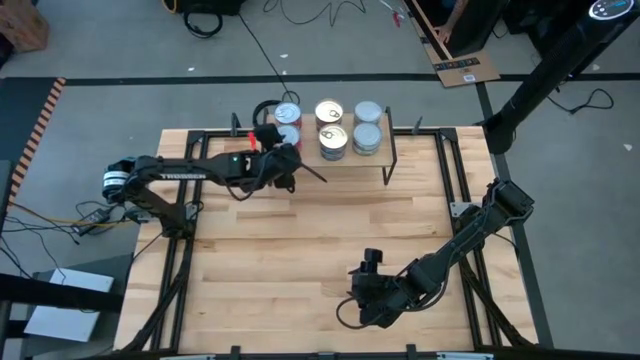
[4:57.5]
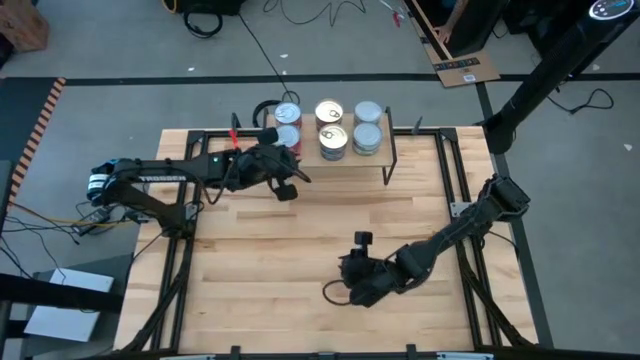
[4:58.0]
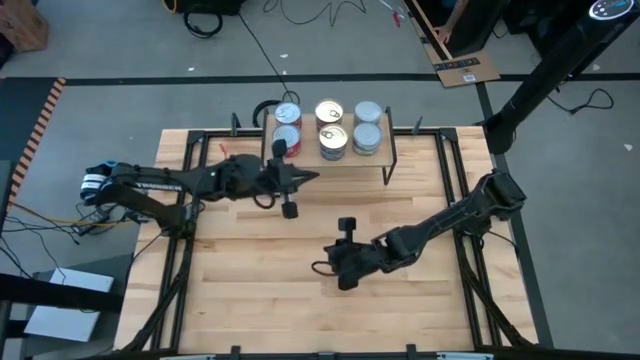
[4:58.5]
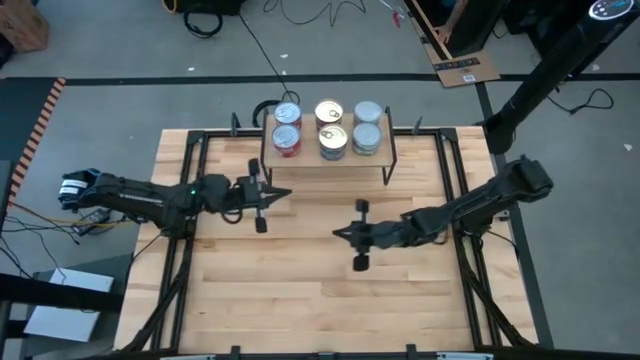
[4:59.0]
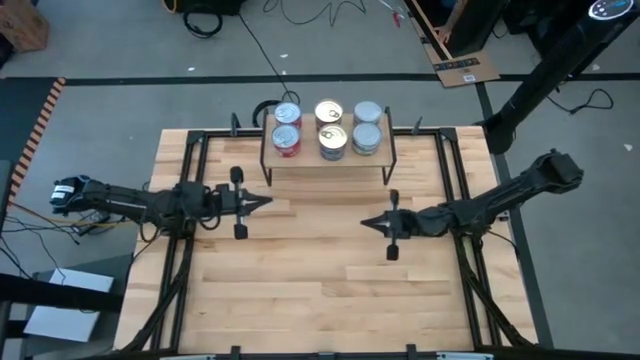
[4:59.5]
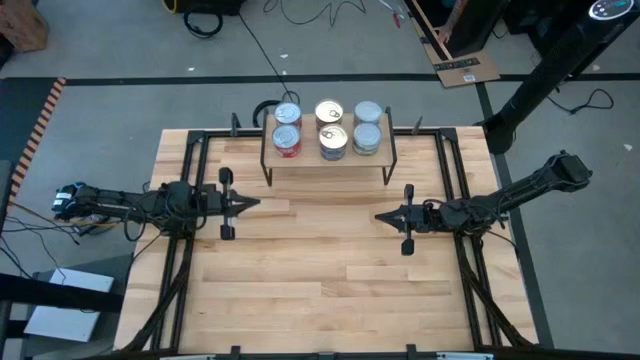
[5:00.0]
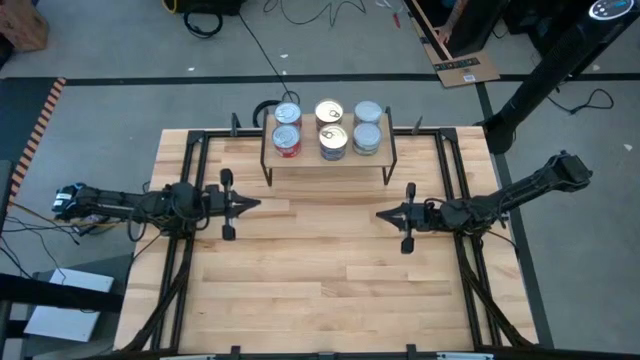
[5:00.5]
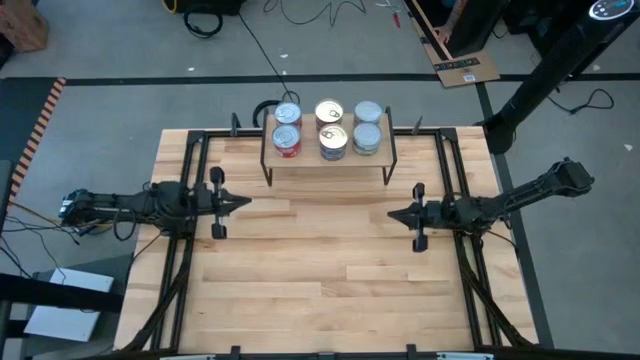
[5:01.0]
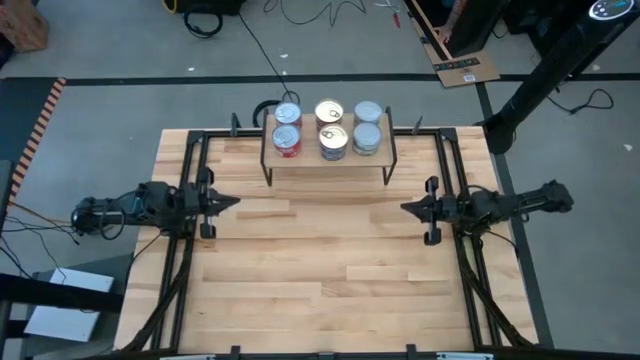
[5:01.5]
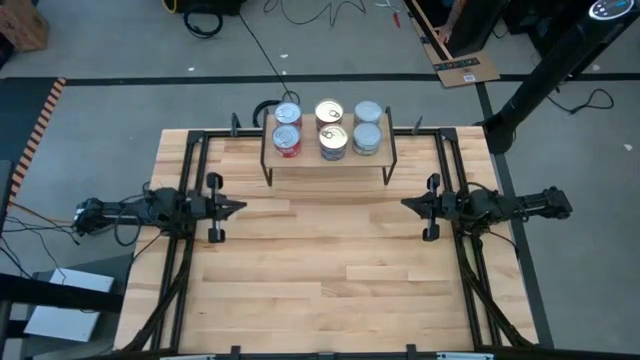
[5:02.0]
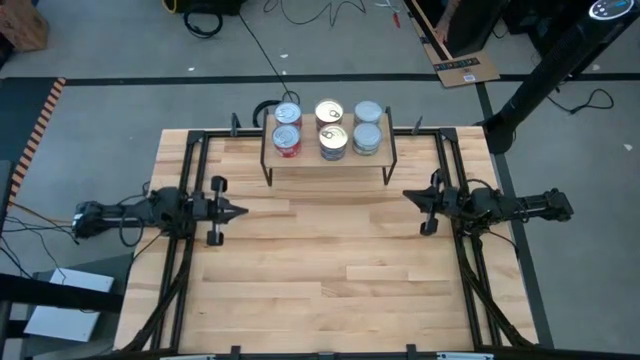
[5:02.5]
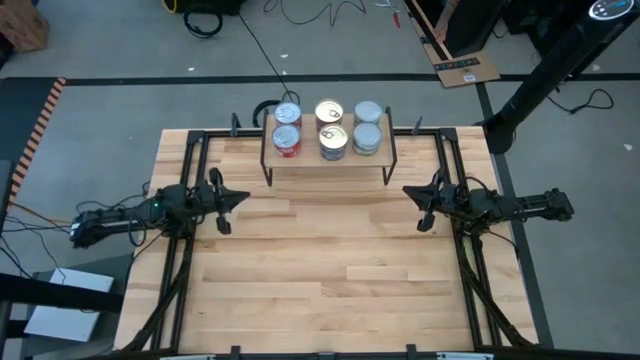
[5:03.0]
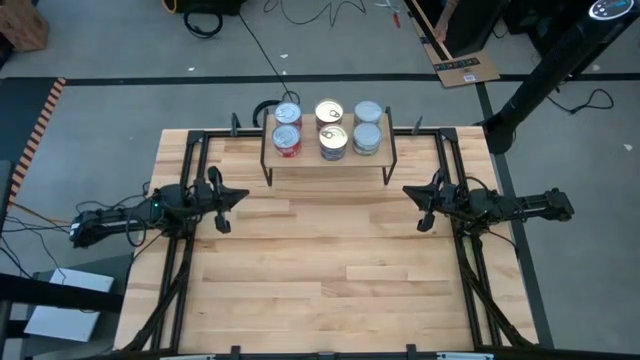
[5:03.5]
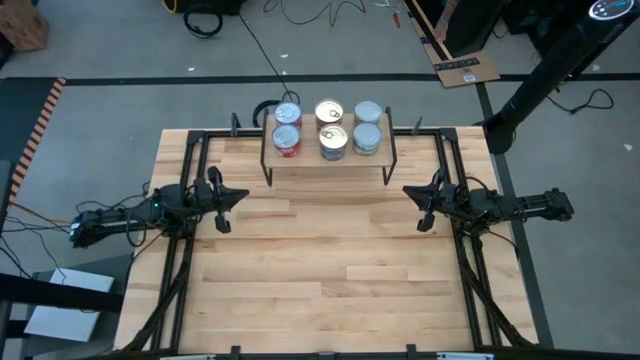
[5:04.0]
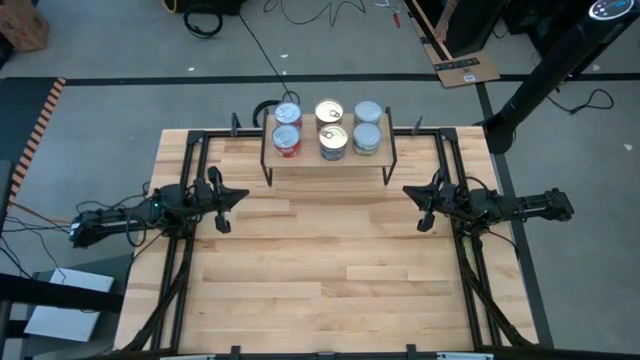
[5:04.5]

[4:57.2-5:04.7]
Task: Stack canned seafood by type on shelf
Return to Home Position

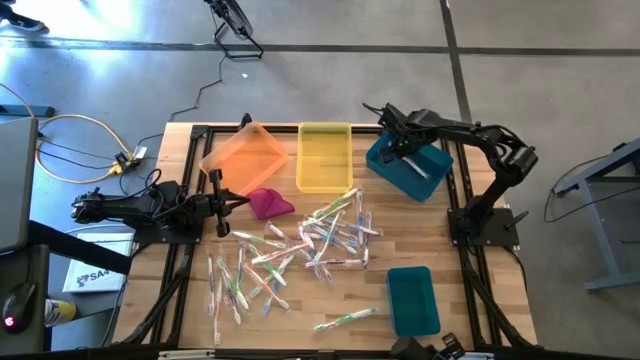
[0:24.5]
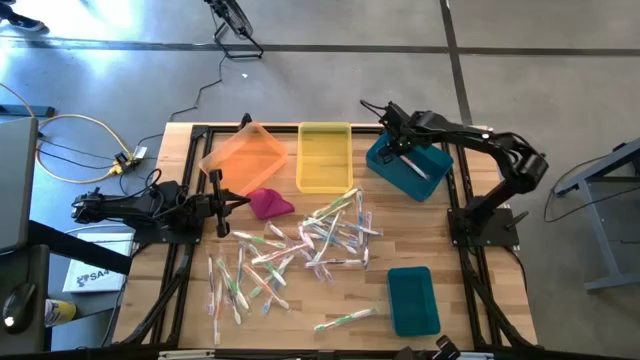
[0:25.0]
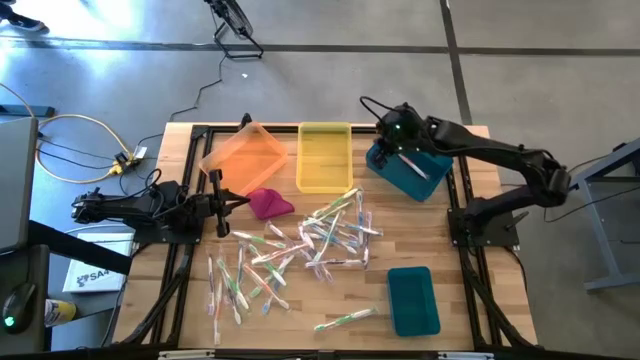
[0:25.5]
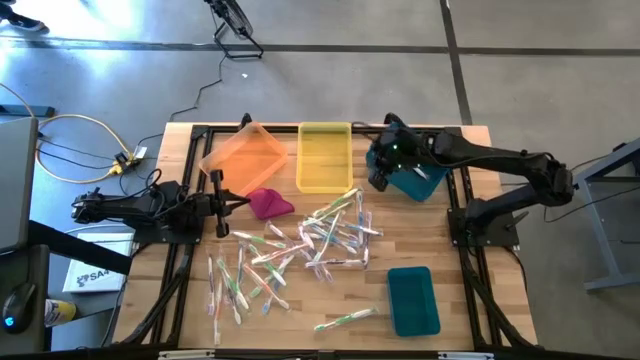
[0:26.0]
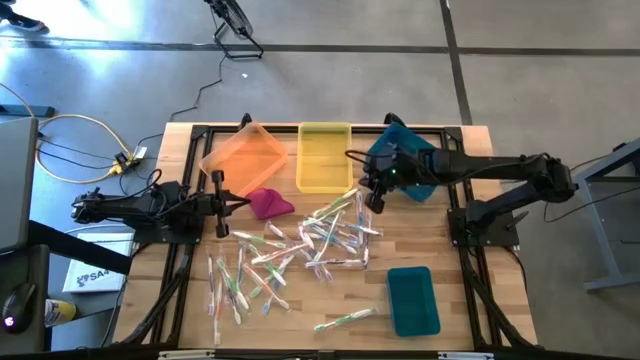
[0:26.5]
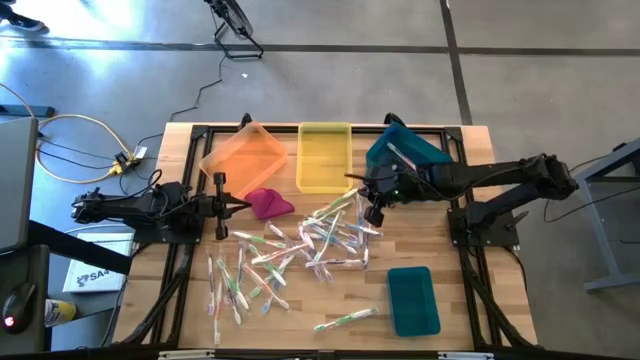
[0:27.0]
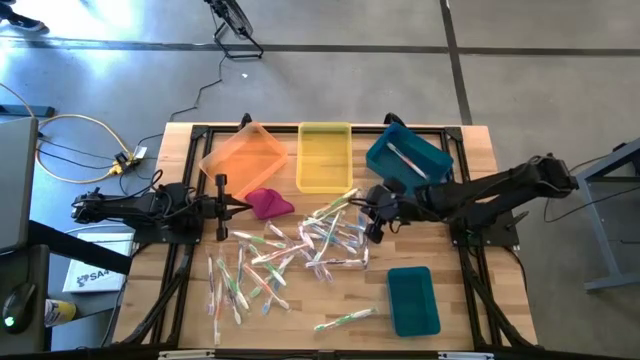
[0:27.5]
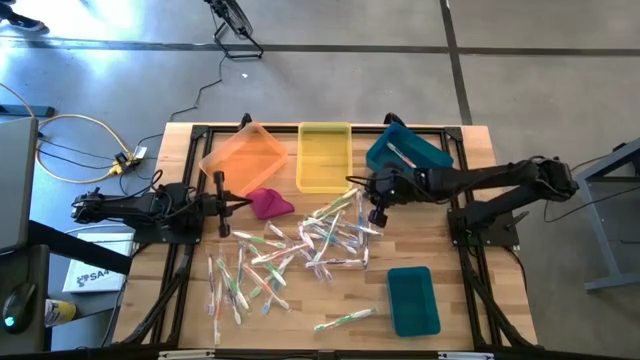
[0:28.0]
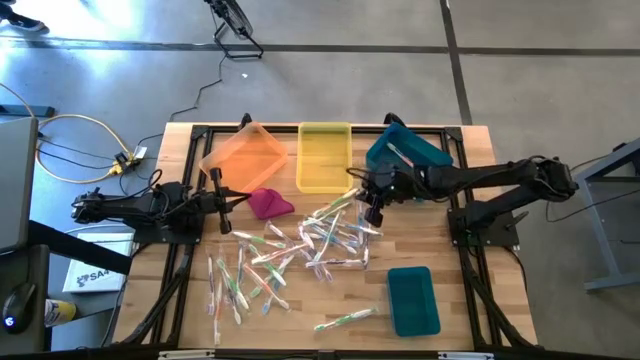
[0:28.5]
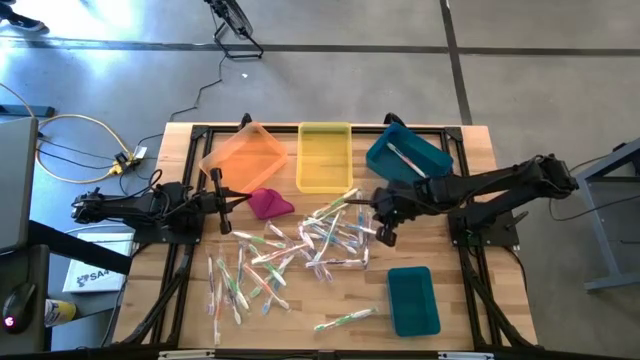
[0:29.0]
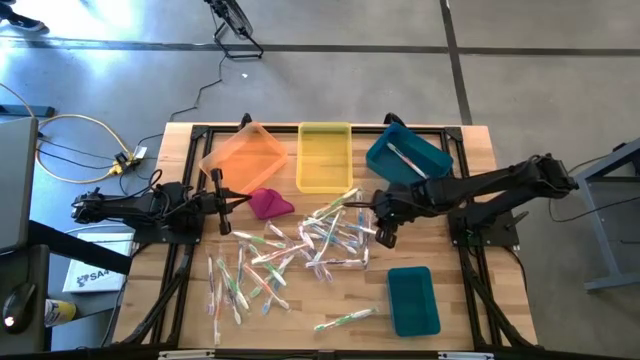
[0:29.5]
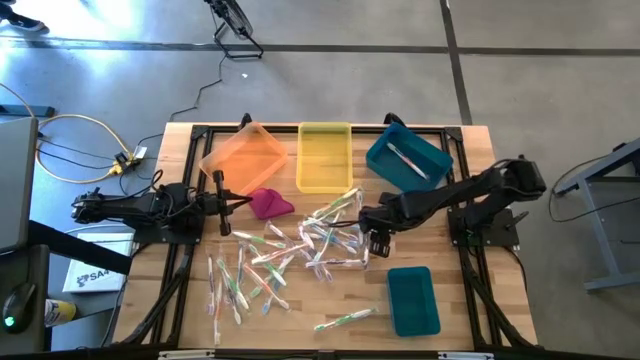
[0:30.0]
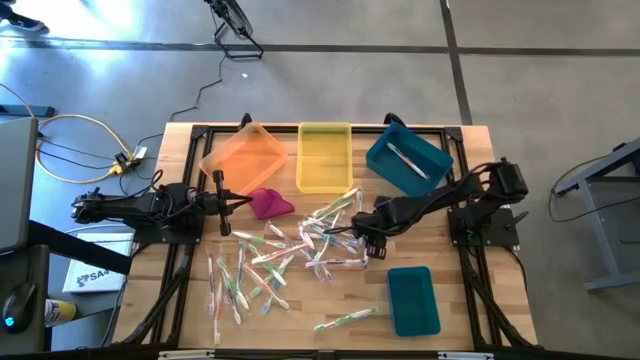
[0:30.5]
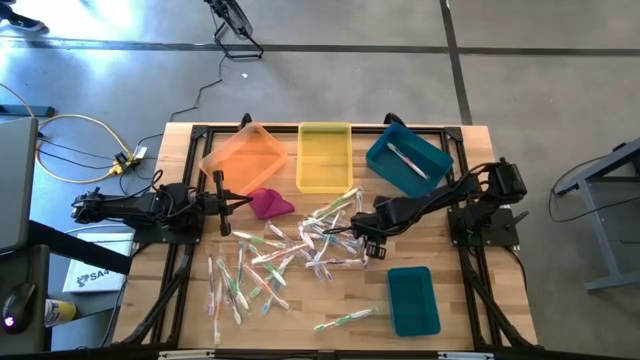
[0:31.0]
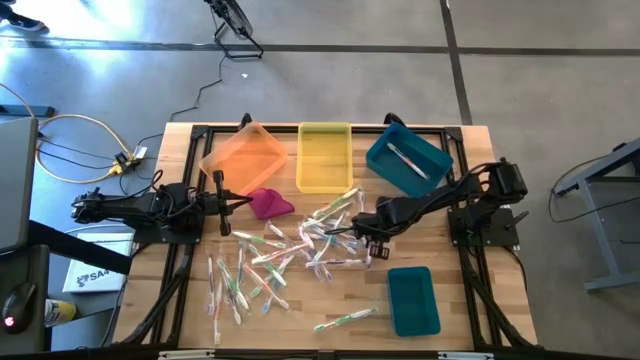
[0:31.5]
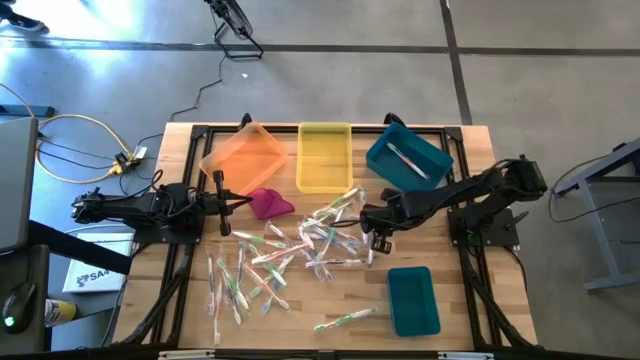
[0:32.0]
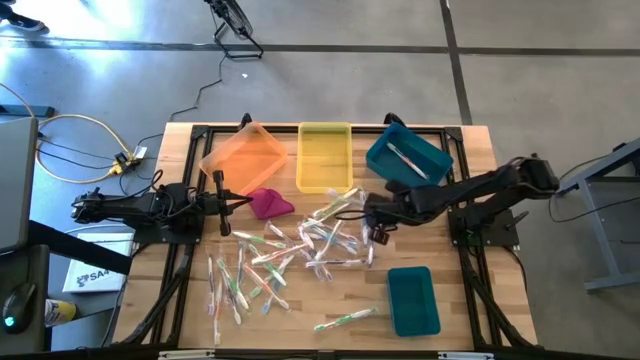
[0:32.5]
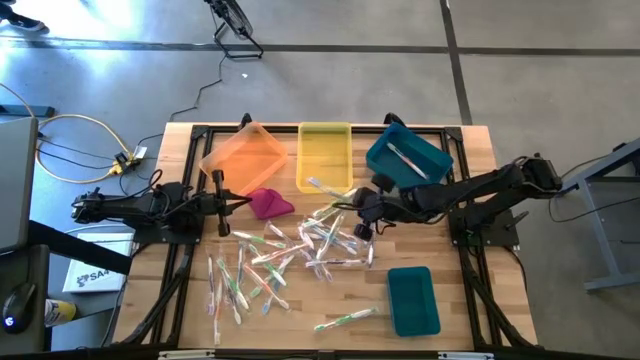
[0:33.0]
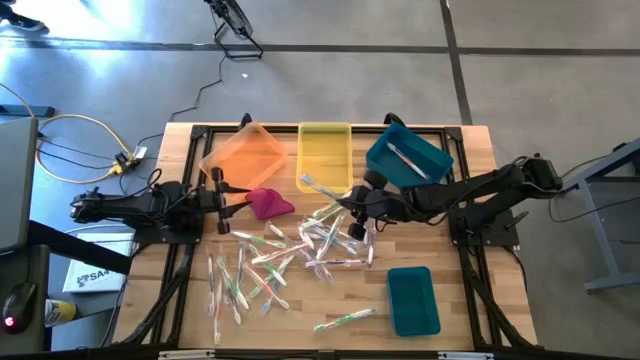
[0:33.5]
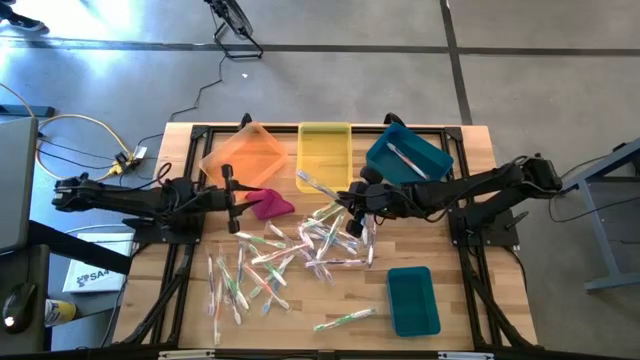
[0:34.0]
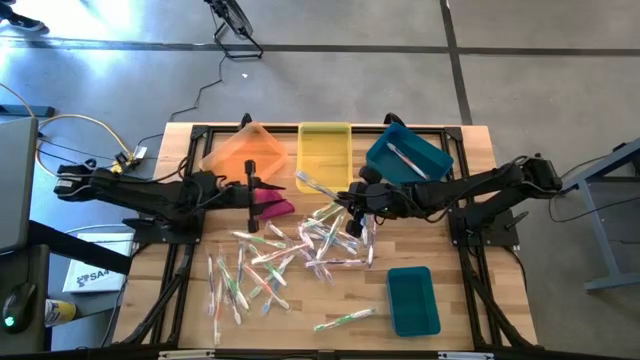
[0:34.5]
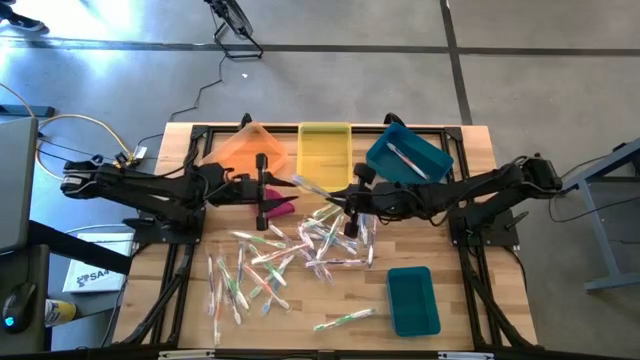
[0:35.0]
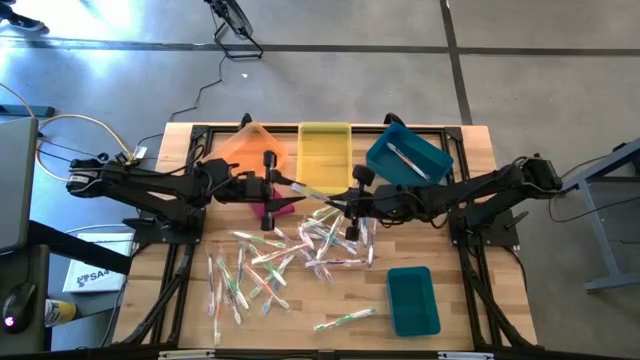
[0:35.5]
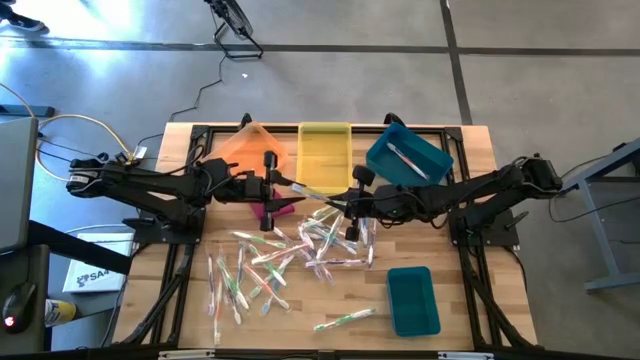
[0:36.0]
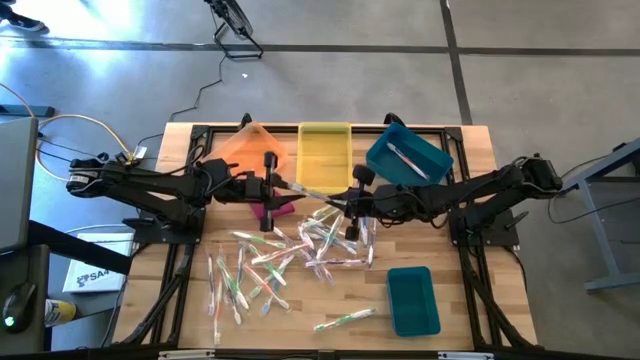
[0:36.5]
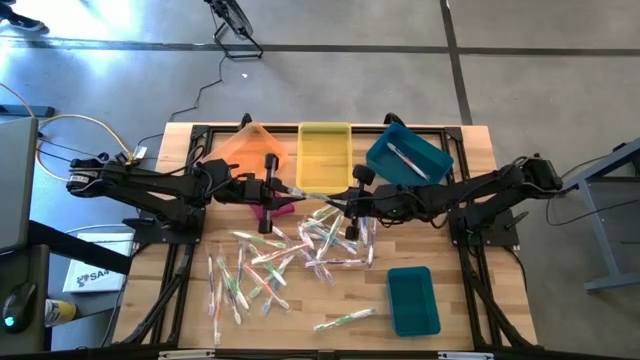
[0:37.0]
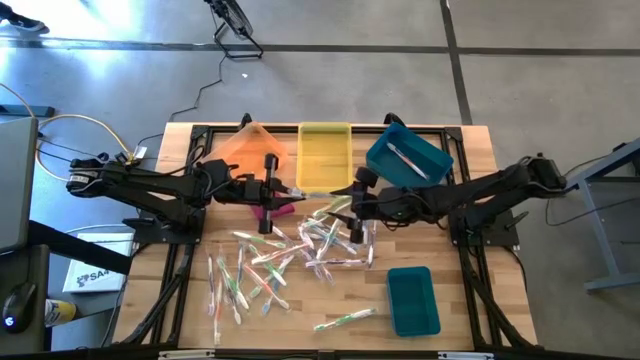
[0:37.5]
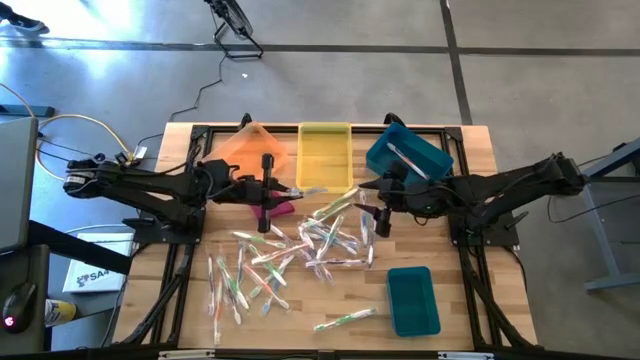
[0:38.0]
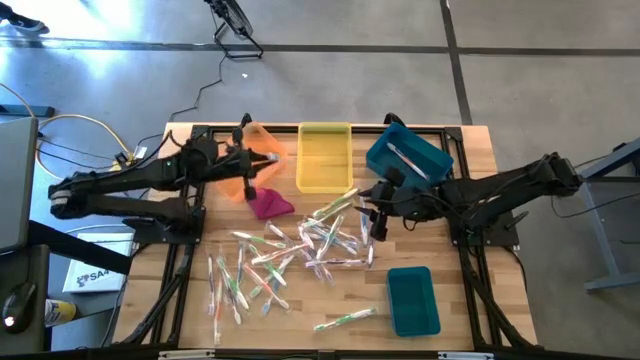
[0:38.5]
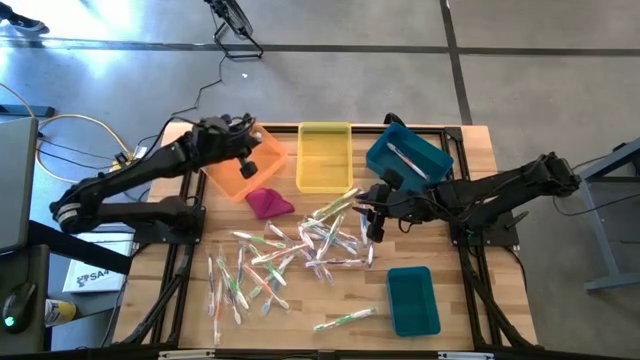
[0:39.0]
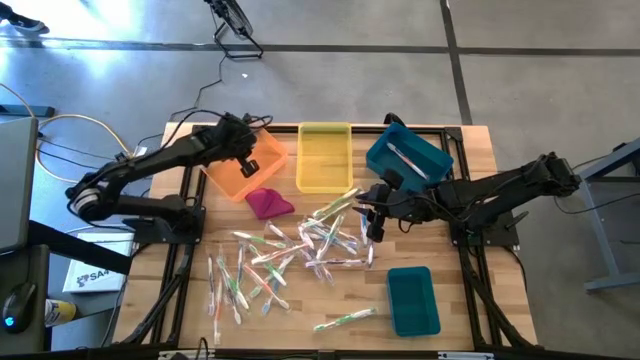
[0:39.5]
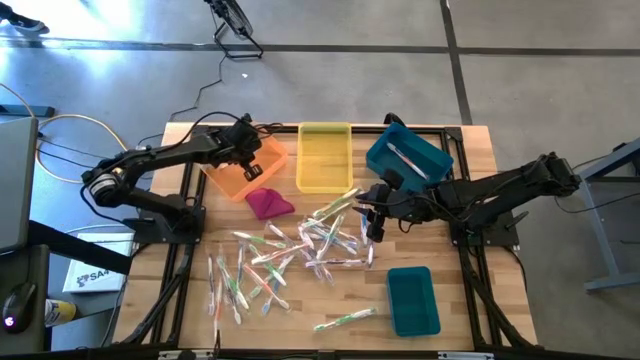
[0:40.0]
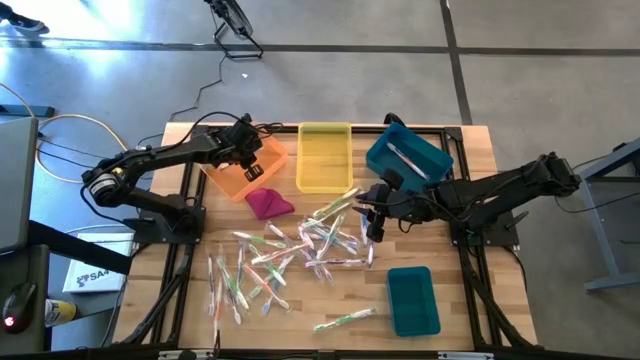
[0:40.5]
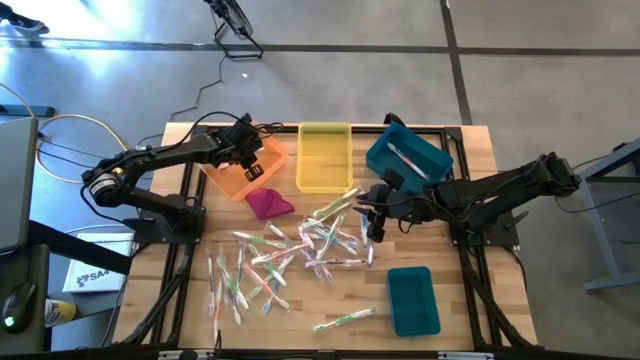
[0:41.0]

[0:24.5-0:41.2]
Task: Pick & Place Toothbrushes
Put the blue toothbrush into the orange bin
